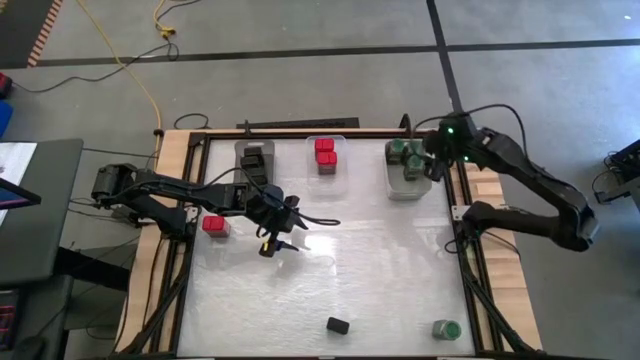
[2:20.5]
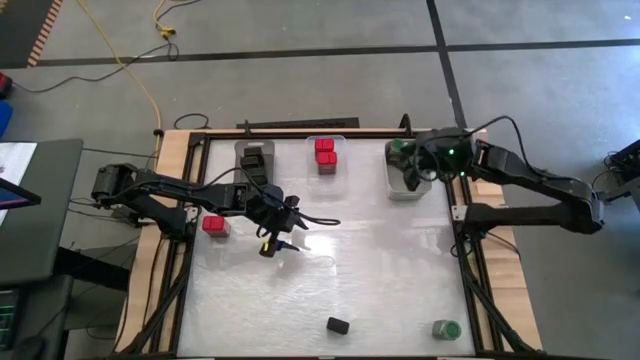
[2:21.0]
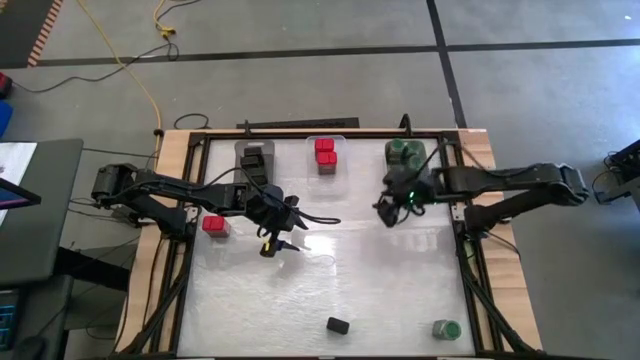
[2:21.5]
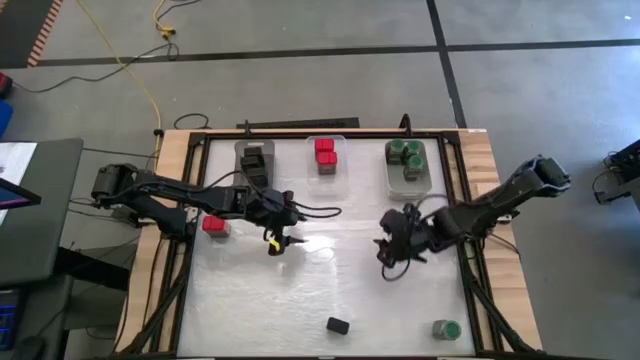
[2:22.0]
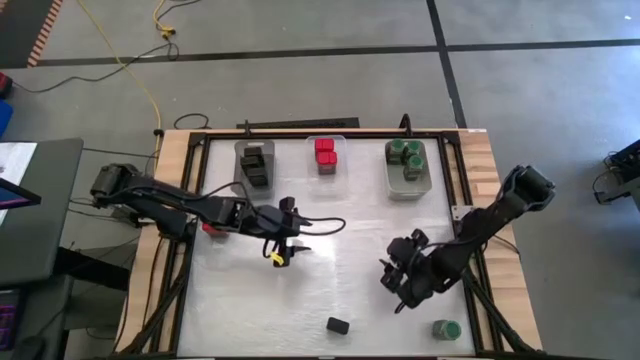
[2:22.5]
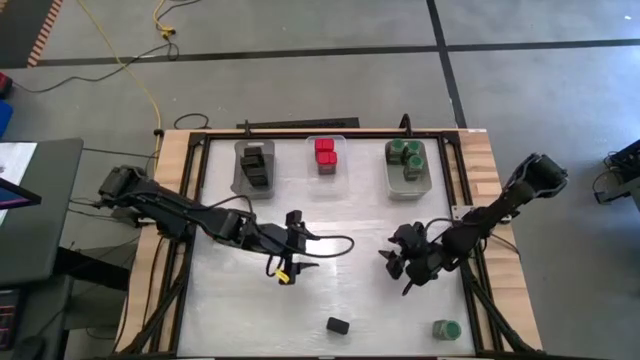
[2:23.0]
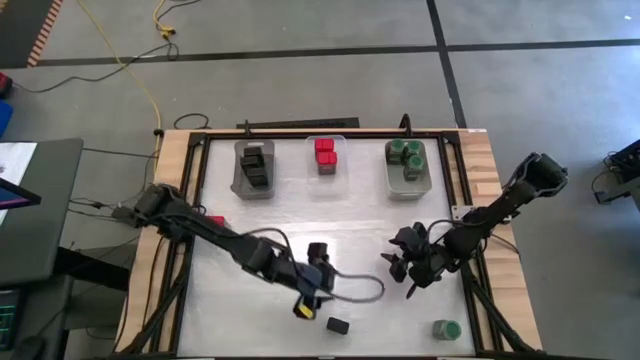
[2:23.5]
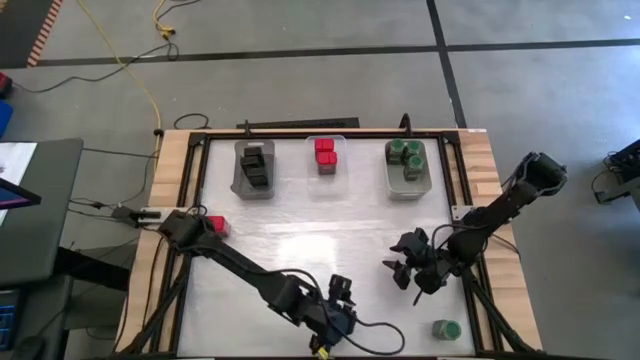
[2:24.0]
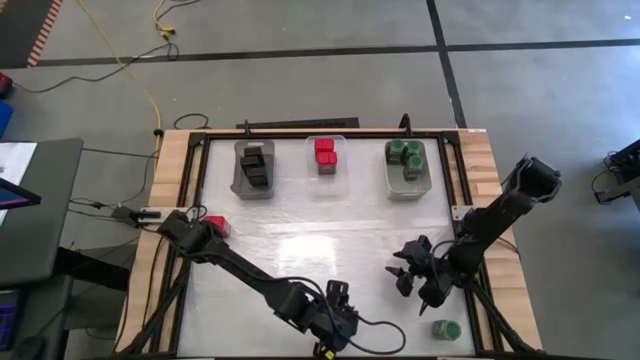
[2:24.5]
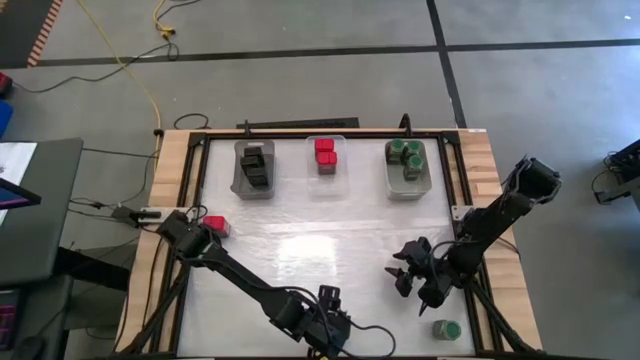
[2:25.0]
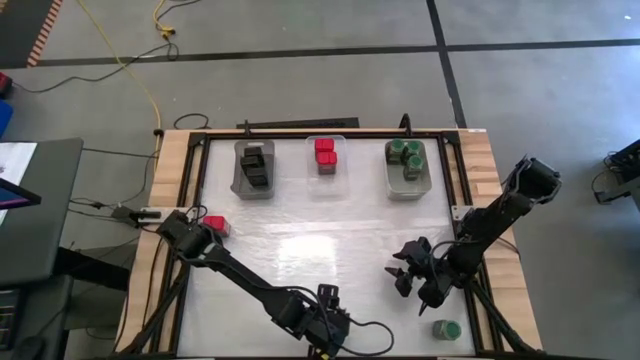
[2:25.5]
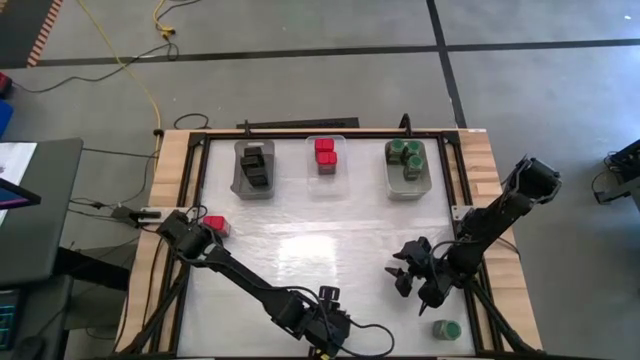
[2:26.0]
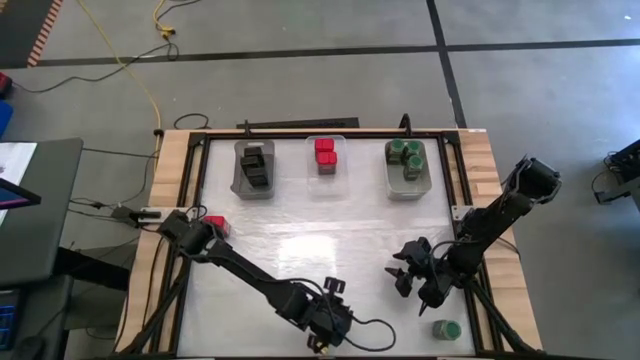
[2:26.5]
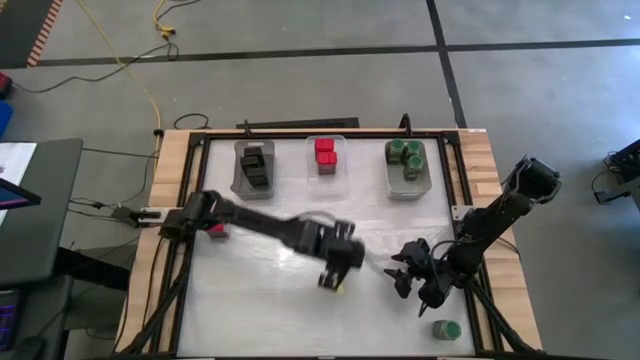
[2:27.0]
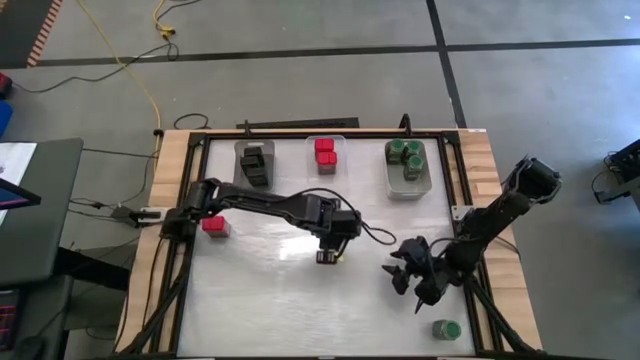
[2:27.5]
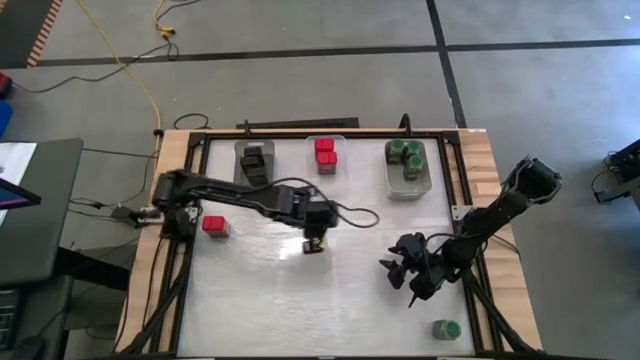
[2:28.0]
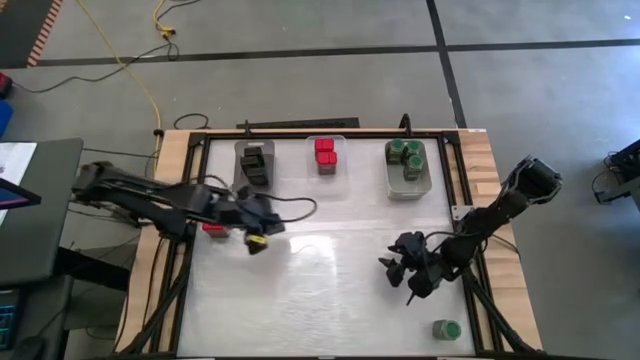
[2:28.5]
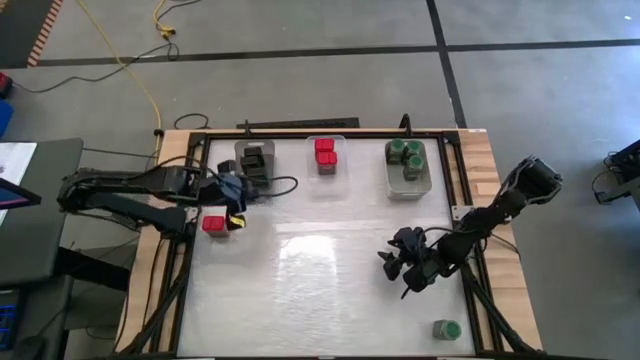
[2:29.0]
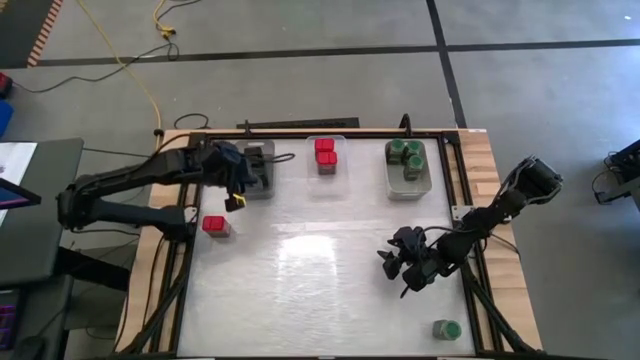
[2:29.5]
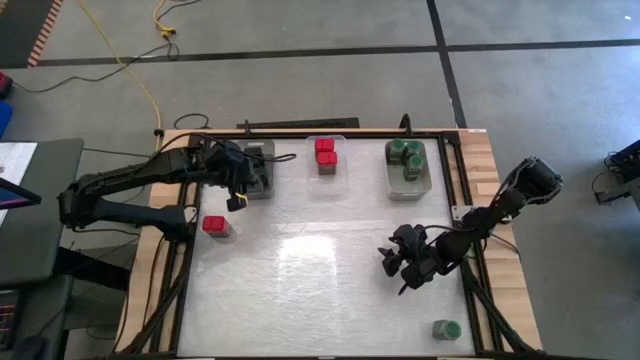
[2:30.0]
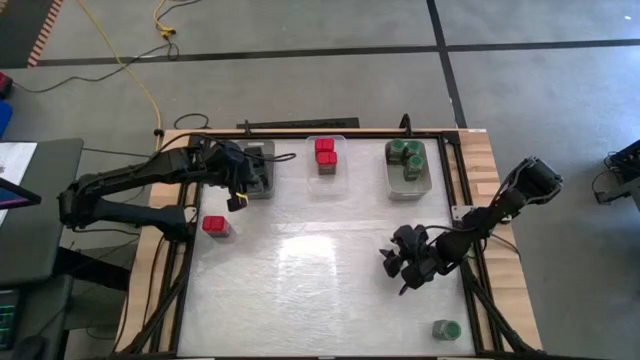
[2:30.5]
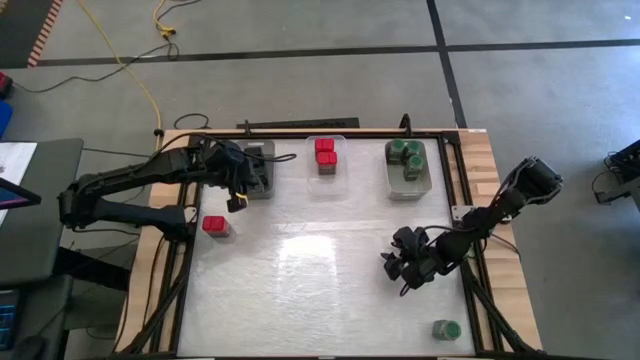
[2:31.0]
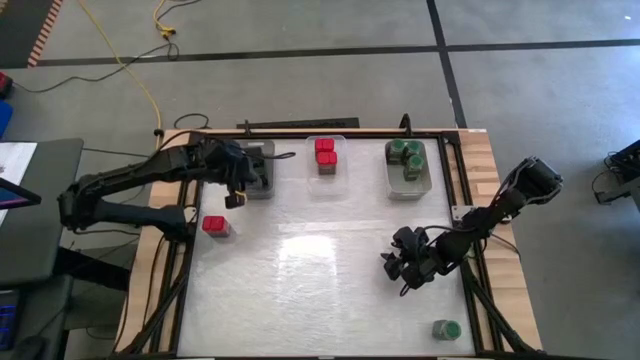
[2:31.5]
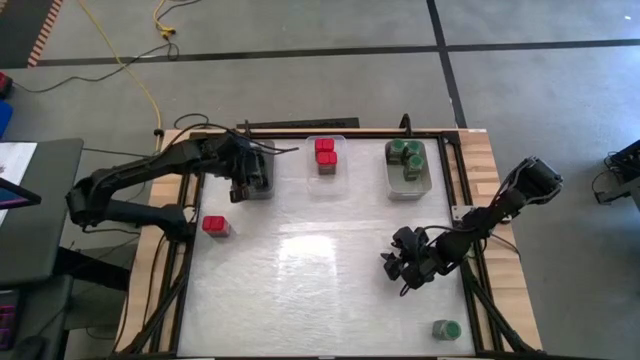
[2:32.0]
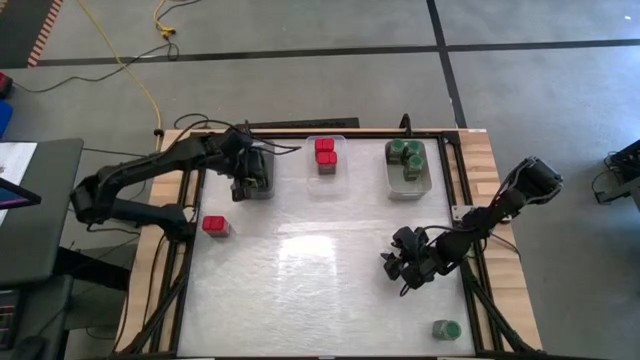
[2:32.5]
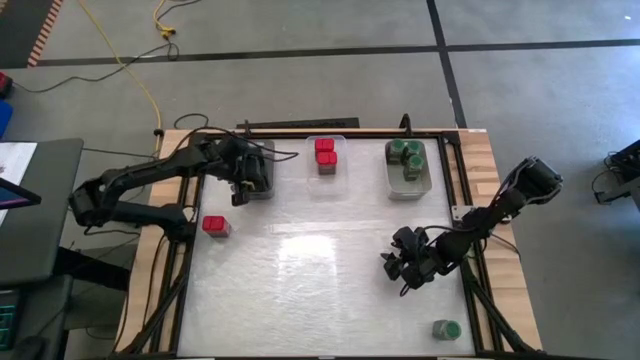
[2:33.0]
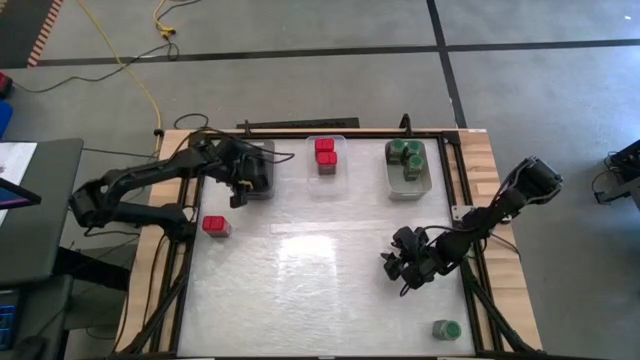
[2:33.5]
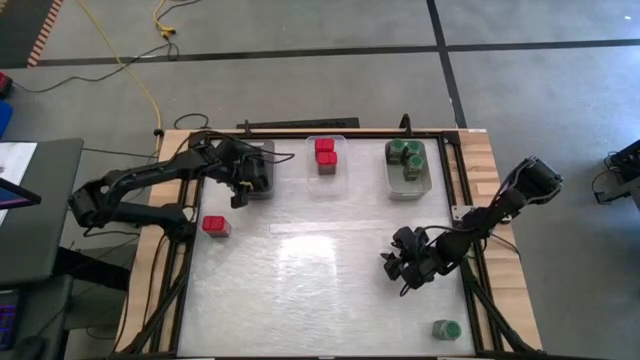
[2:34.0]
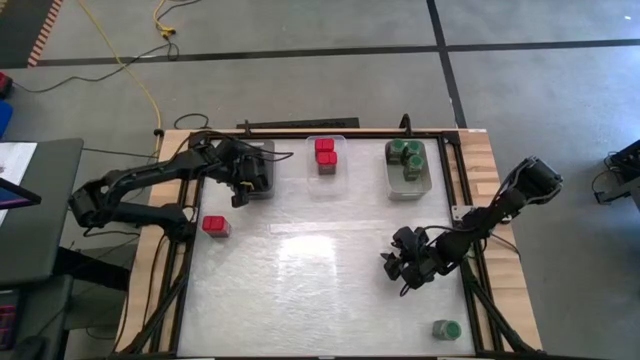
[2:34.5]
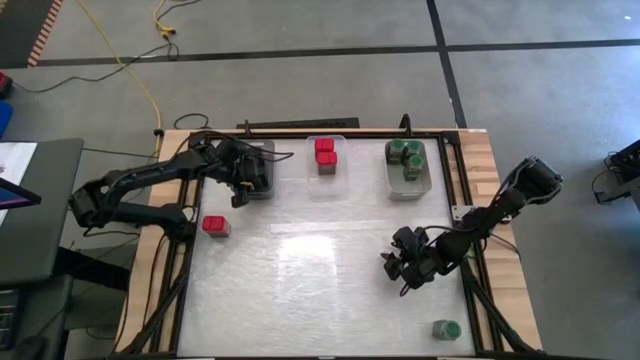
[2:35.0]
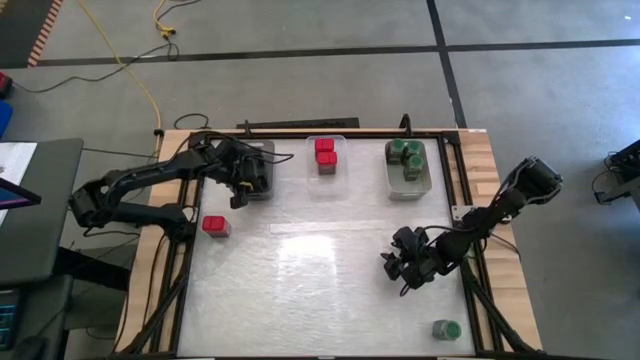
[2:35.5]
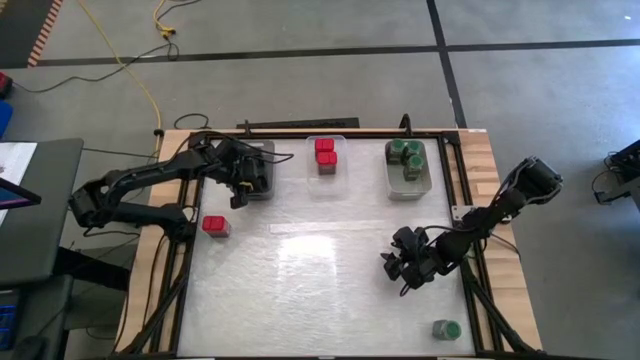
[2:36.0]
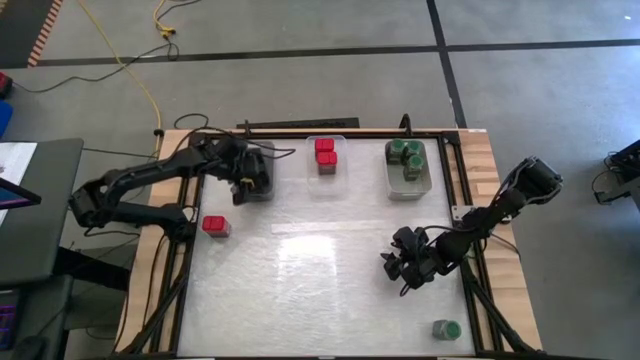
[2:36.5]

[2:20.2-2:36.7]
Task: Sort spices by type
Put the black seasoning can into the black bin
